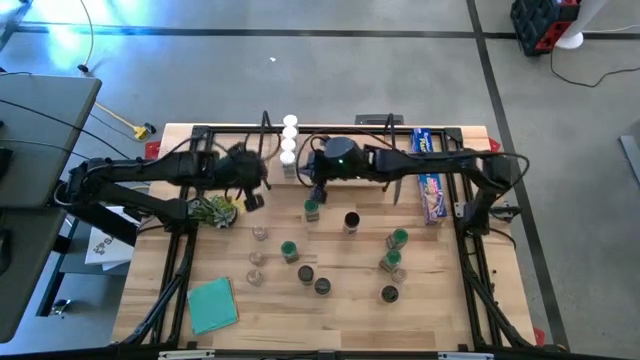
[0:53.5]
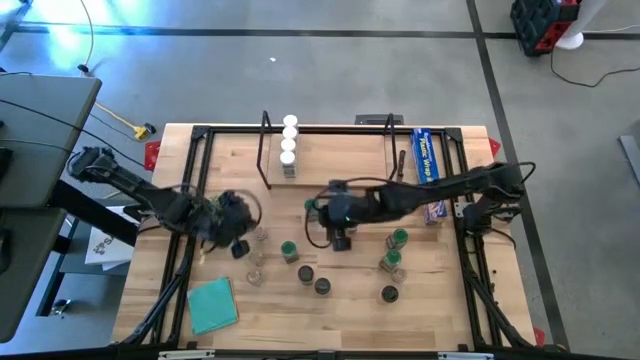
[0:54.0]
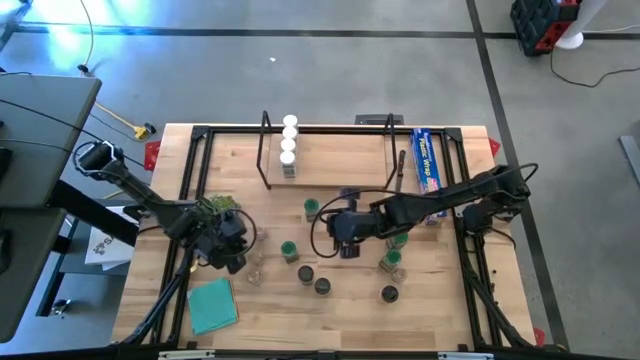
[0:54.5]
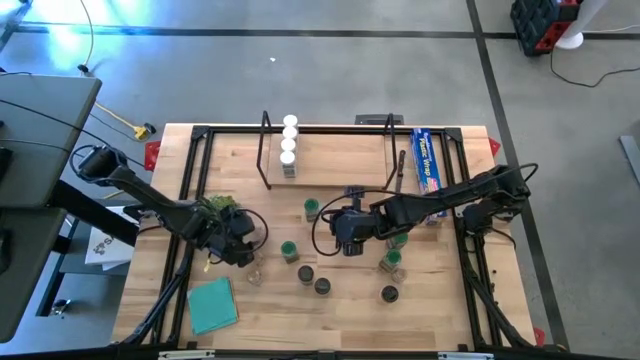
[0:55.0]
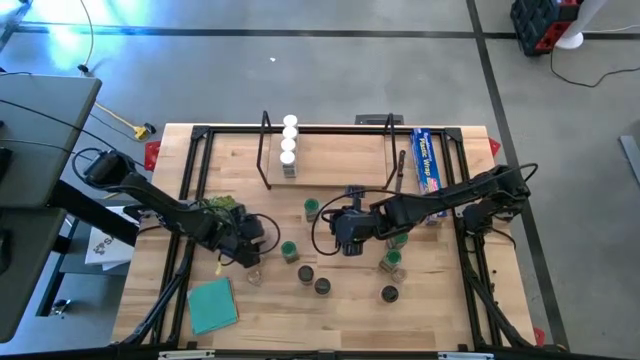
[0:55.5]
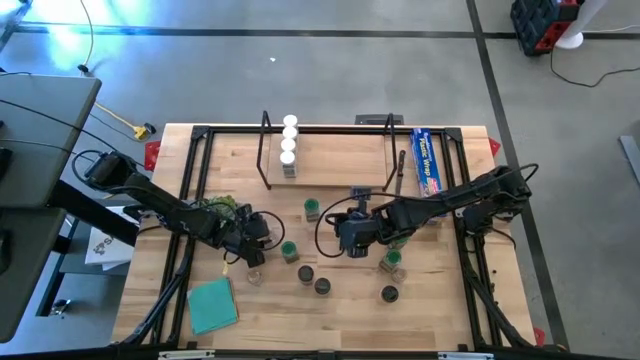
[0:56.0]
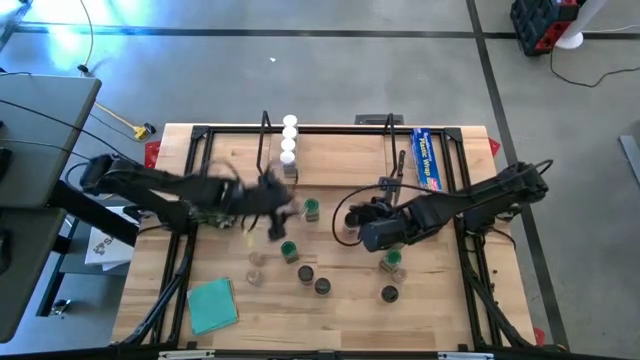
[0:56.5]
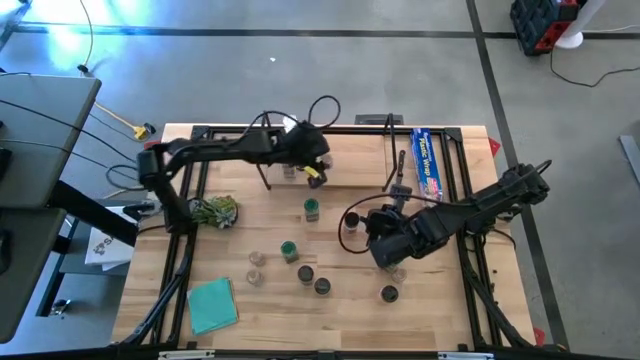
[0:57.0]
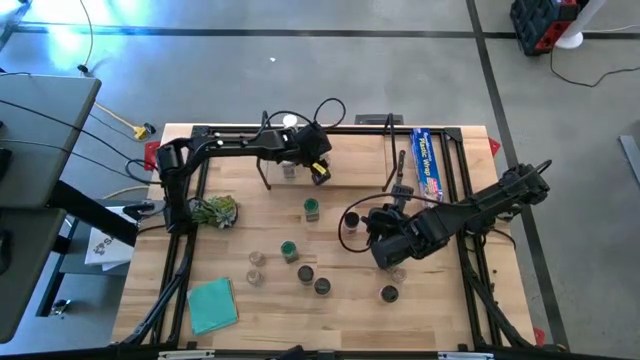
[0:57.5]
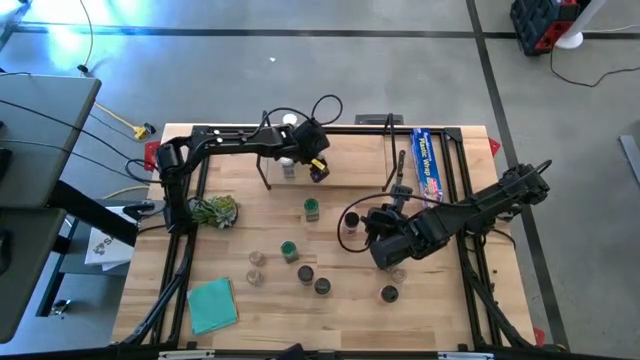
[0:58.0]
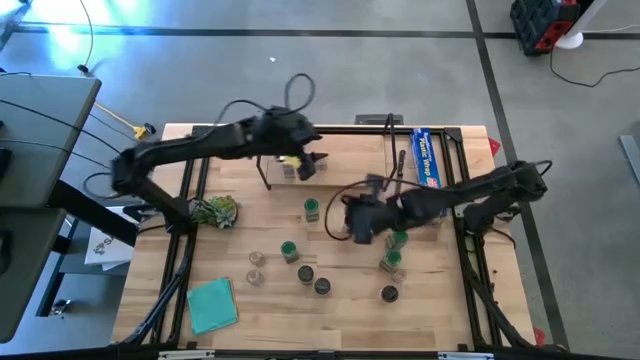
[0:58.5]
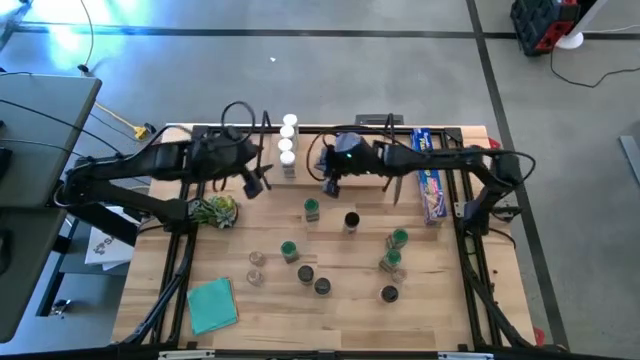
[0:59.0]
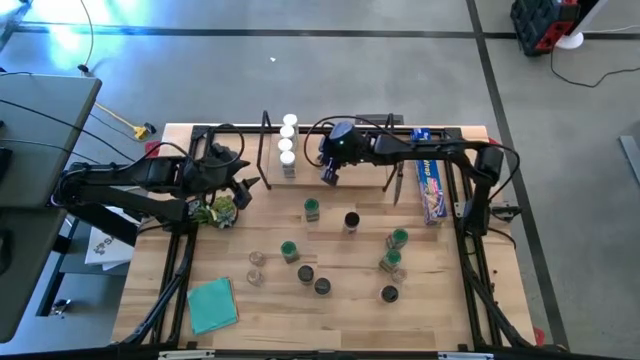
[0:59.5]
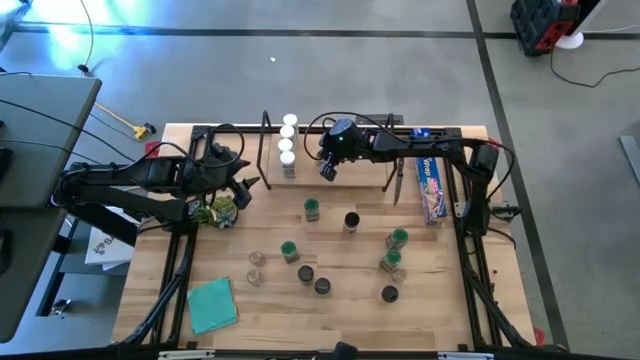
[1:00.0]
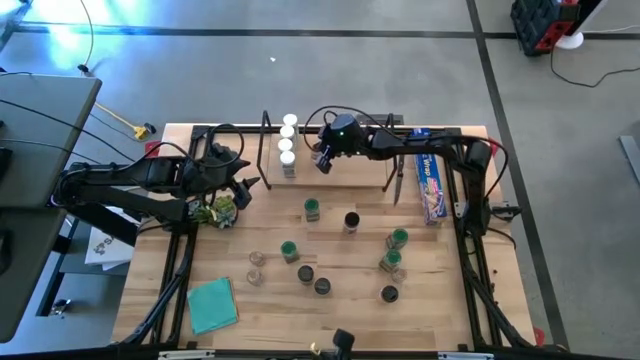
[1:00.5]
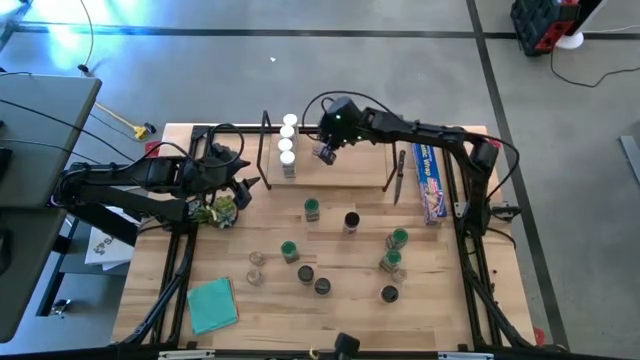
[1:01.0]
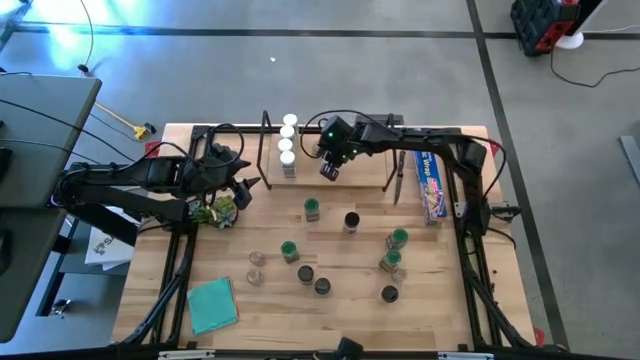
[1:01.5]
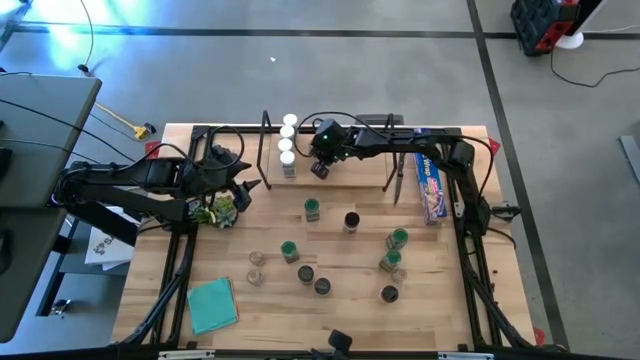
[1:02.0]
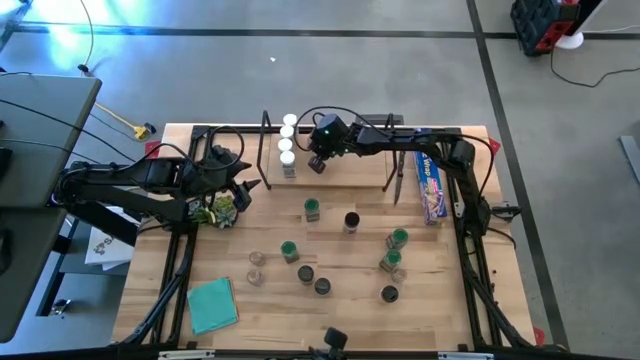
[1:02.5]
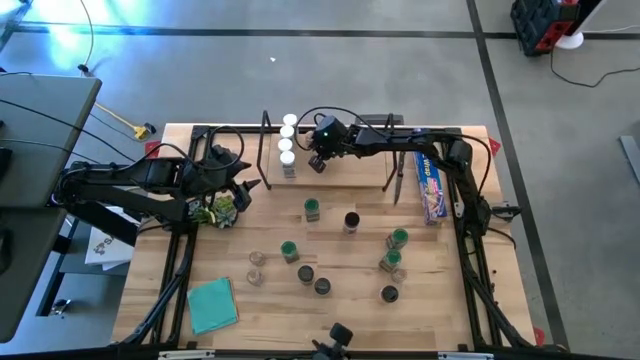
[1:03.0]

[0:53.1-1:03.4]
Task: Shelf spices
Put the brown seasoning bottle on the shelf

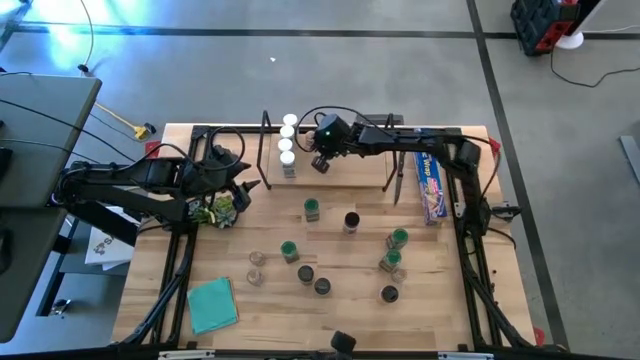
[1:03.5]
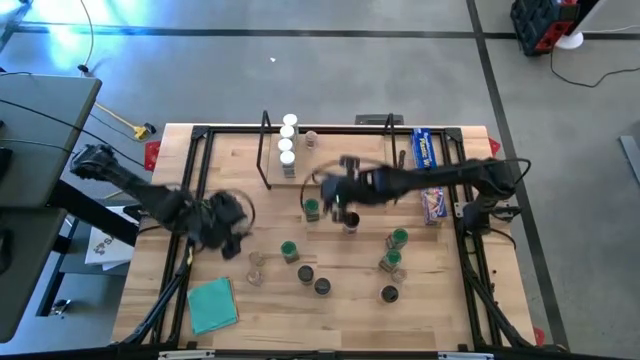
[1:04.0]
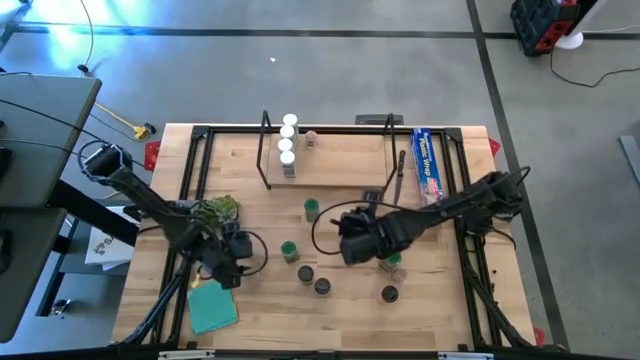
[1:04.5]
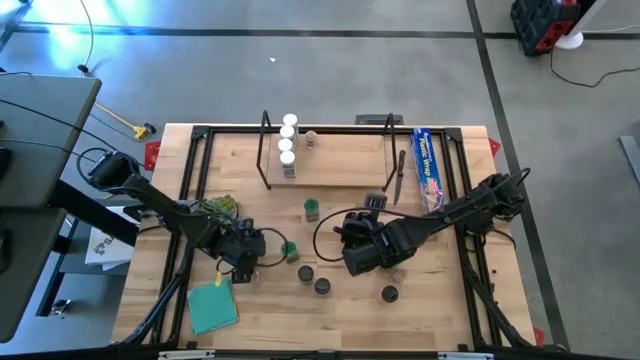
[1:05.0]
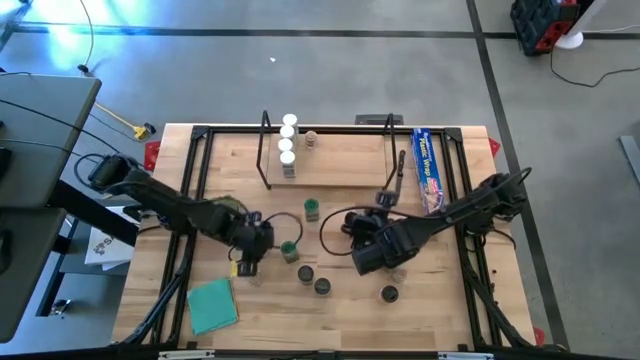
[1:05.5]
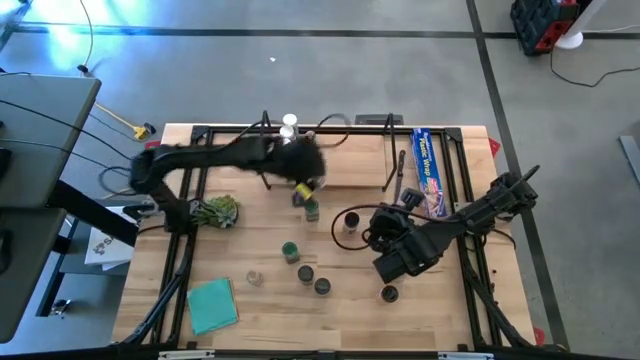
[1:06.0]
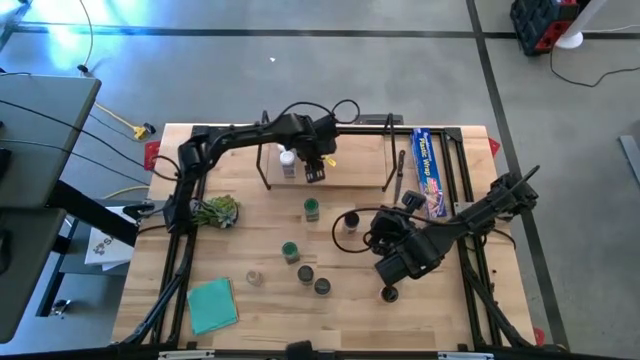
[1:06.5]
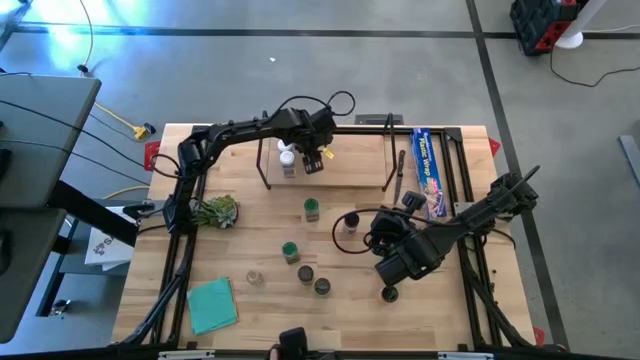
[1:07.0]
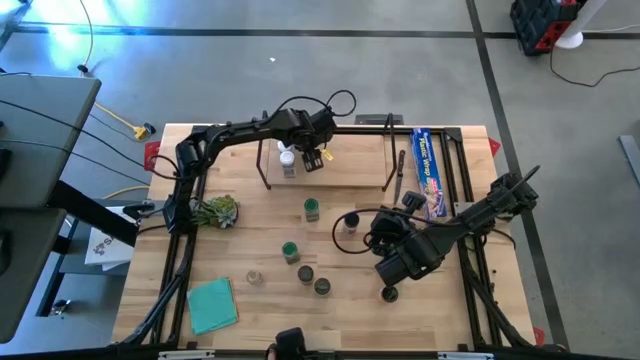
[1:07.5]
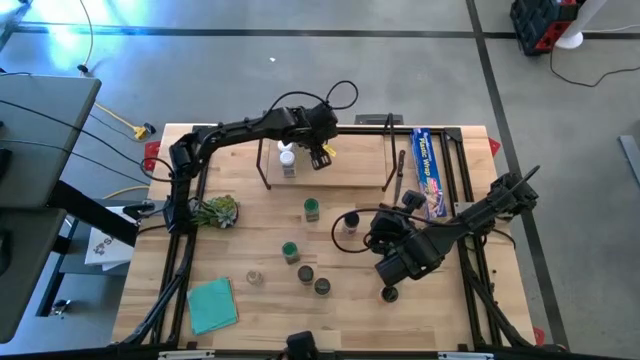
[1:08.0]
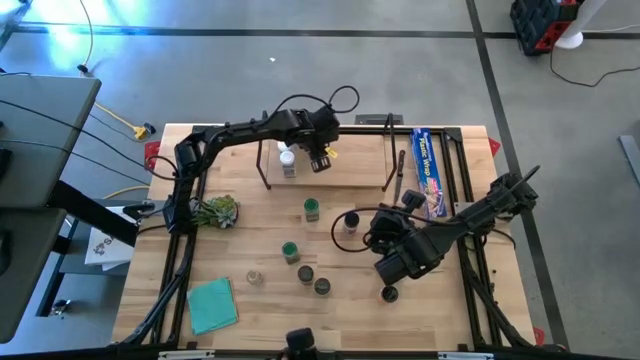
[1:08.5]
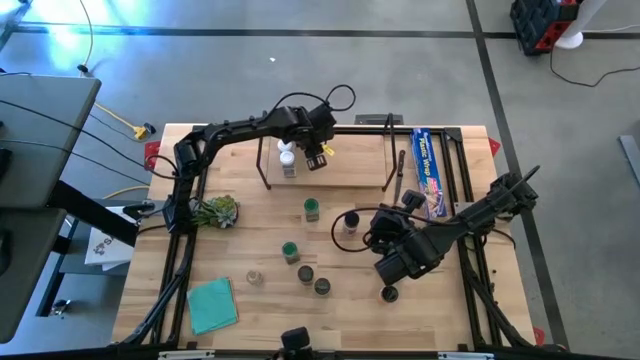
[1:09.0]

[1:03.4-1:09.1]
Put the brown seasoning bottle on the shelf aligned with the other brown seasoning bottle

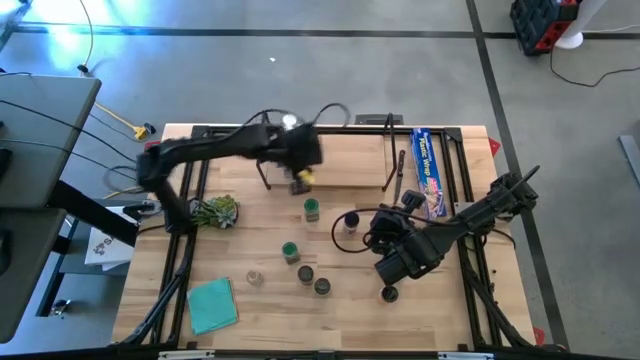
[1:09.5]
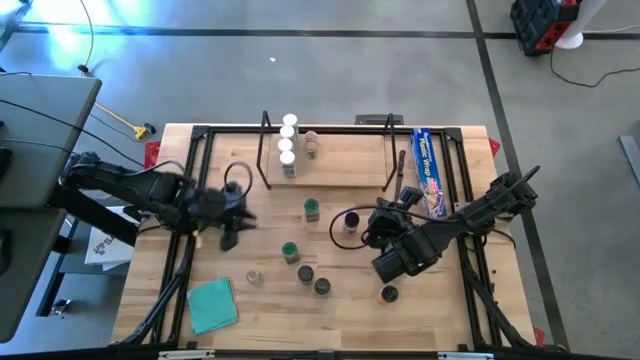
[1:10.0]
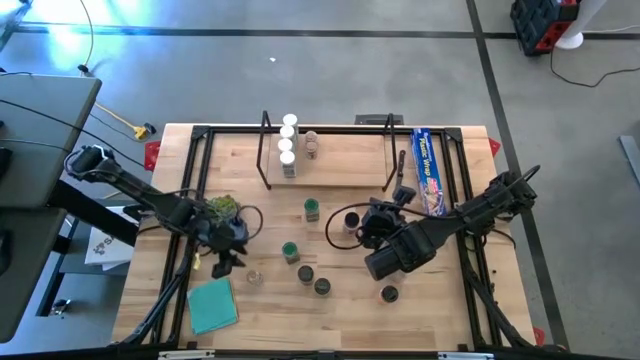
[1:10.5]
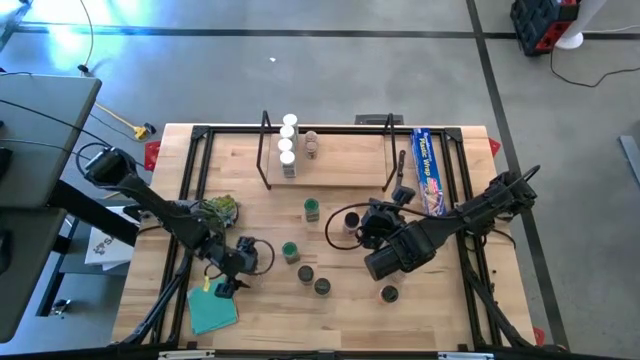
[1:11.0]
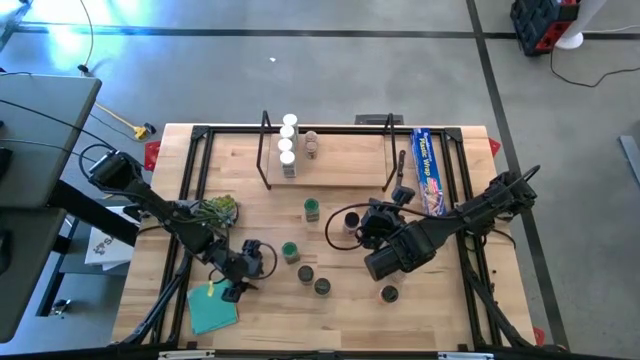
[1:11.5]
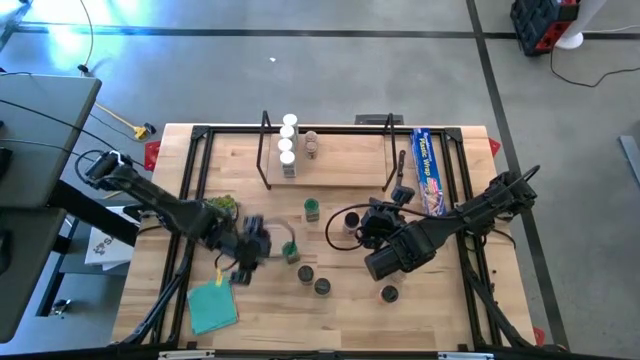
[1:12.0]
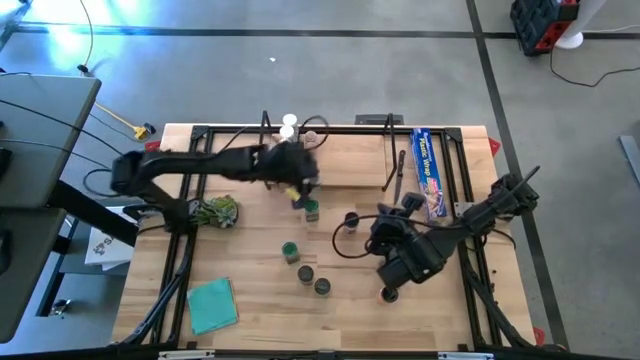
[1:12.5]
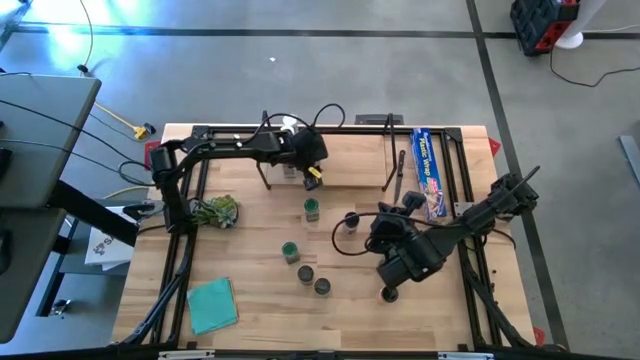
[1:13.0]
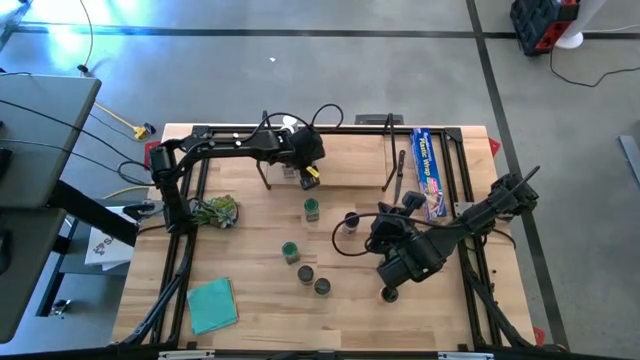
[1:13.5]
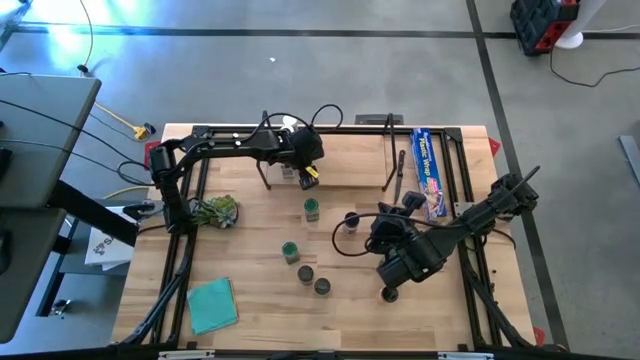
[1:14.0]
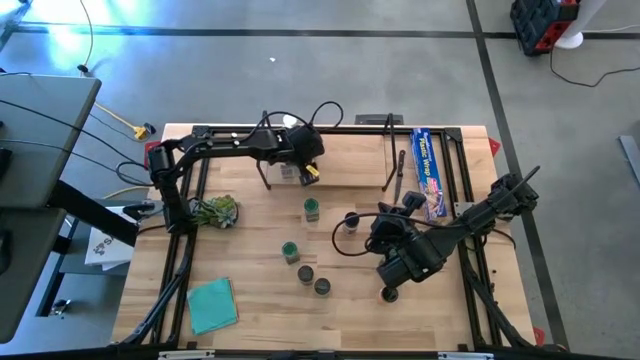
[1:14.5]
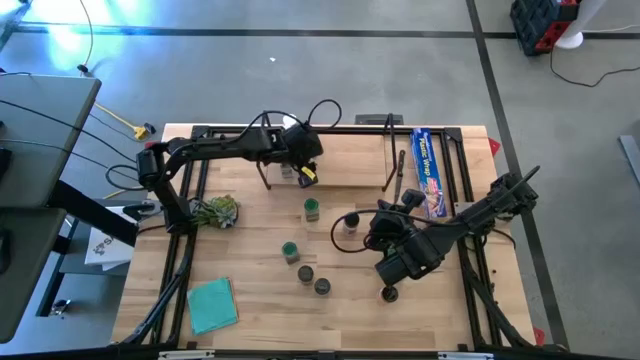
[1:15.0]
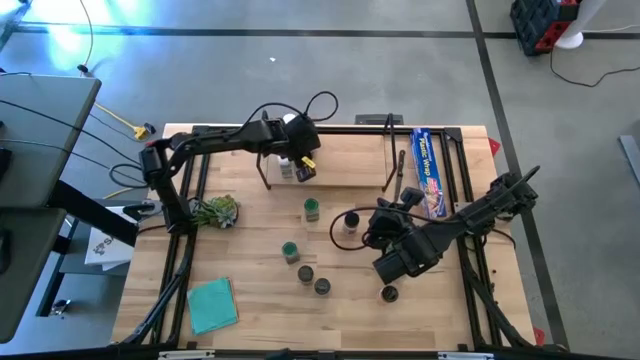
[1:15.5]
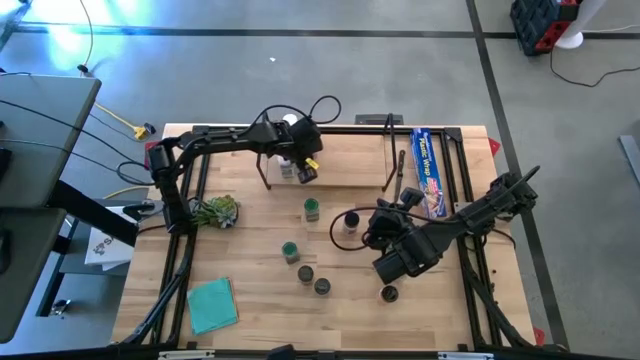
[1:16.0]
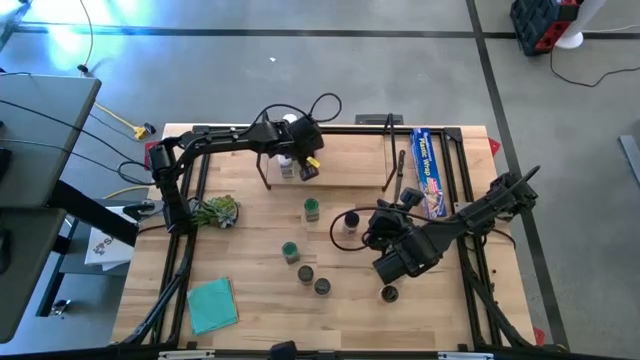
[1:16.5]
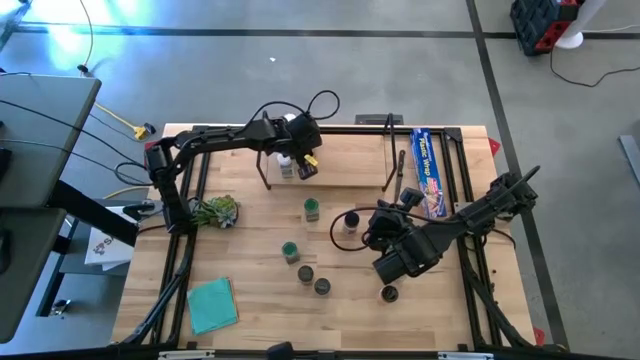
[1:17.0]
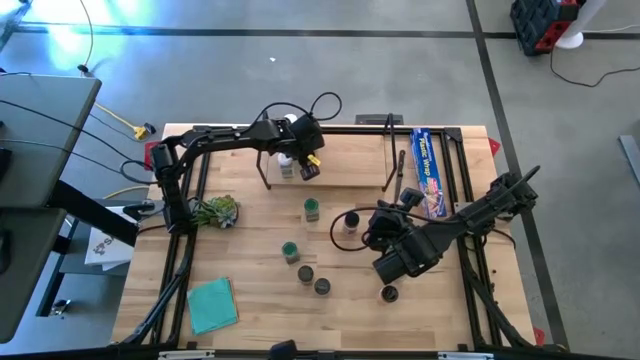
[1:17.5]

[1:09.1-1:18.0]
Put the brown seasoning bottle on the shelf aligned with the other brown seasoning bottles
